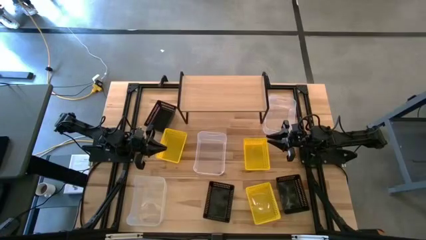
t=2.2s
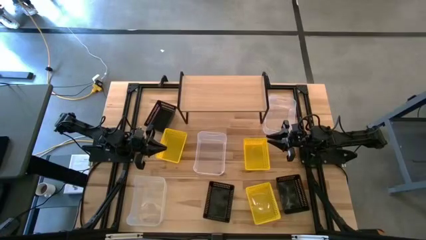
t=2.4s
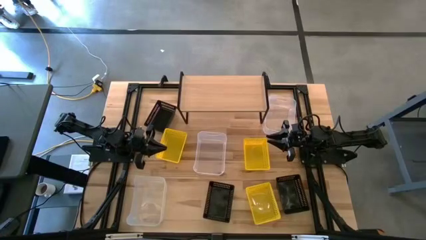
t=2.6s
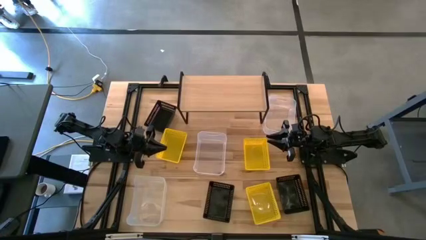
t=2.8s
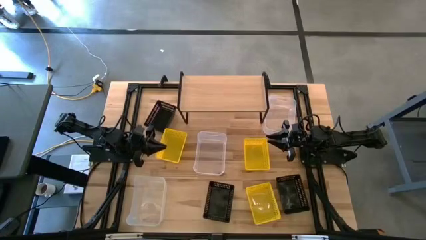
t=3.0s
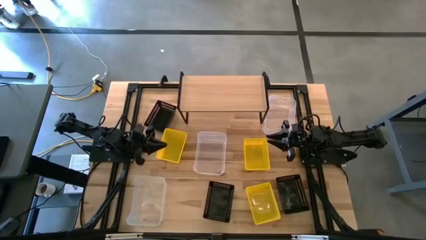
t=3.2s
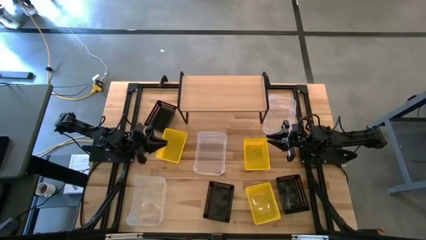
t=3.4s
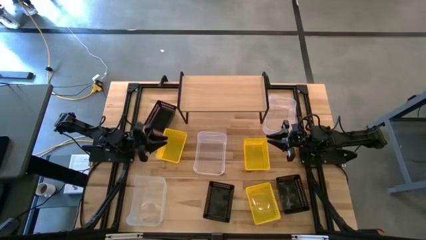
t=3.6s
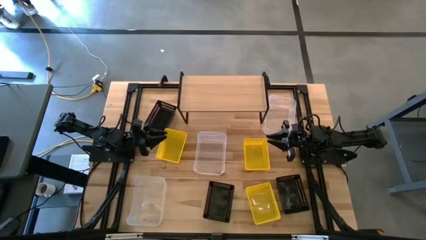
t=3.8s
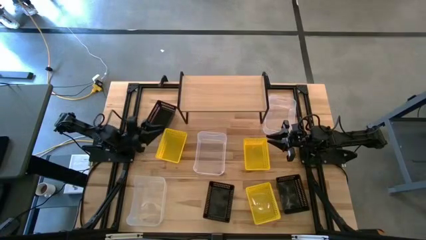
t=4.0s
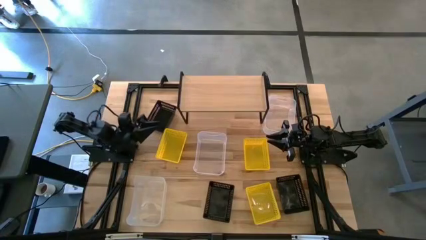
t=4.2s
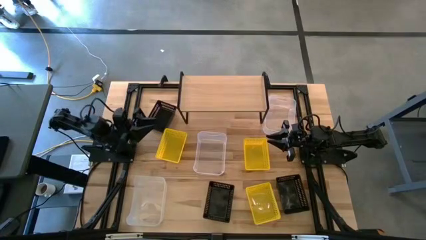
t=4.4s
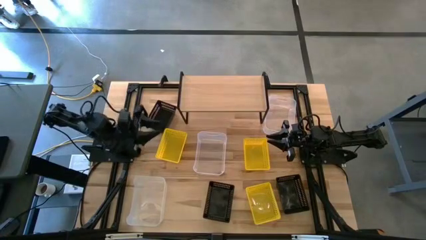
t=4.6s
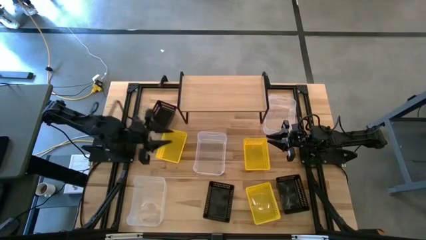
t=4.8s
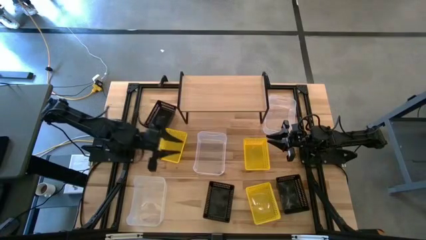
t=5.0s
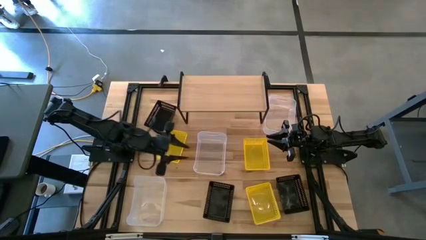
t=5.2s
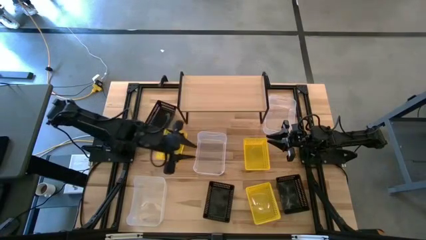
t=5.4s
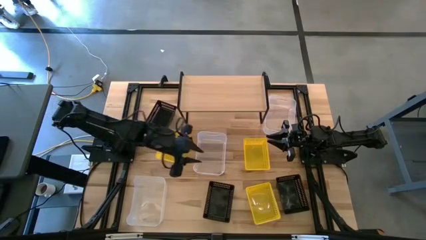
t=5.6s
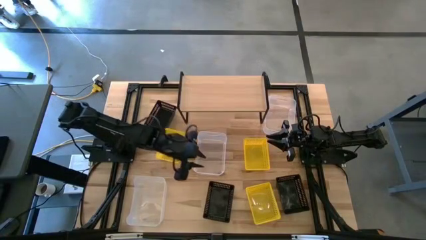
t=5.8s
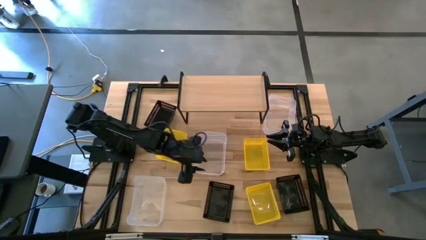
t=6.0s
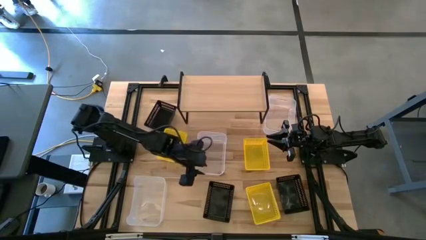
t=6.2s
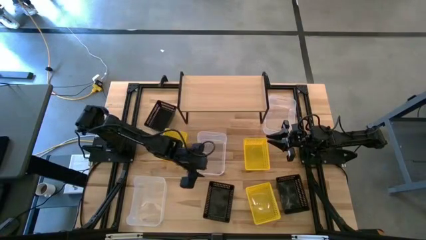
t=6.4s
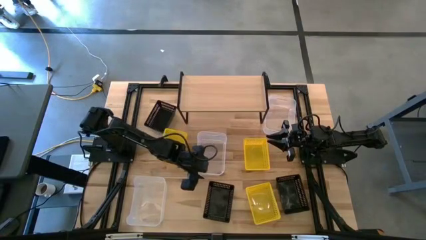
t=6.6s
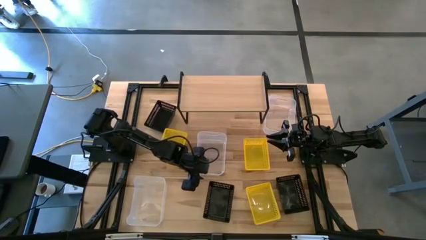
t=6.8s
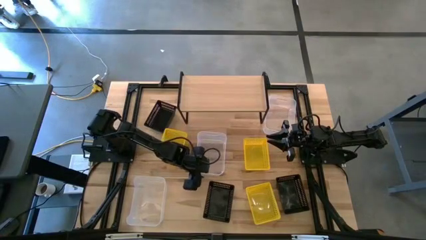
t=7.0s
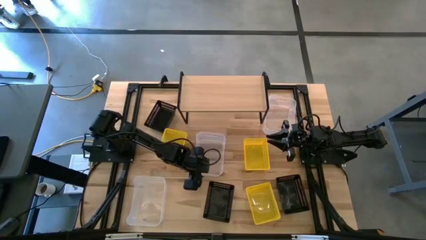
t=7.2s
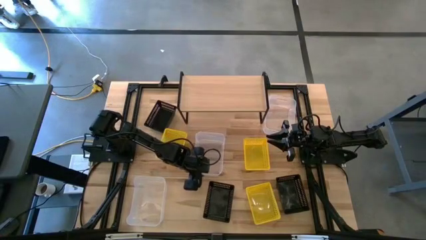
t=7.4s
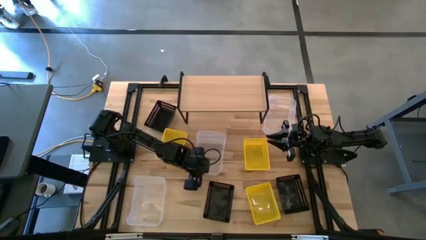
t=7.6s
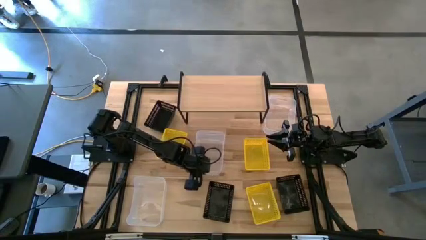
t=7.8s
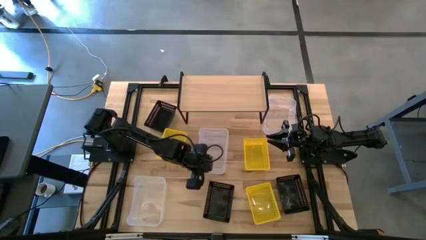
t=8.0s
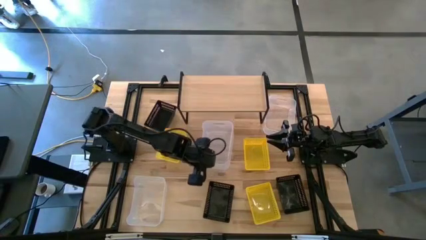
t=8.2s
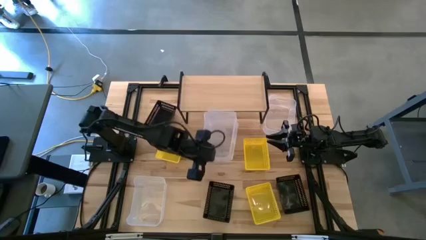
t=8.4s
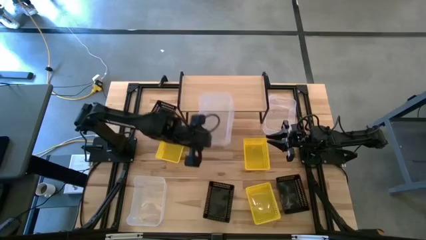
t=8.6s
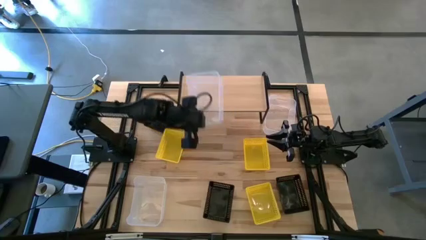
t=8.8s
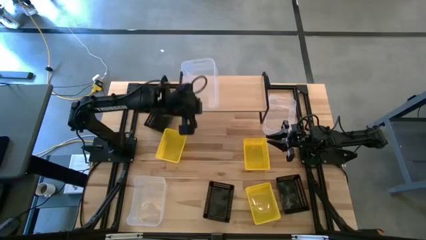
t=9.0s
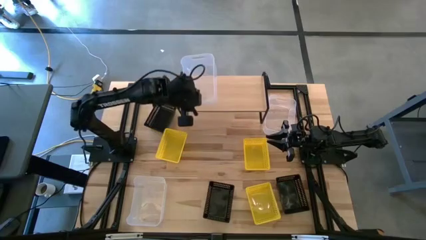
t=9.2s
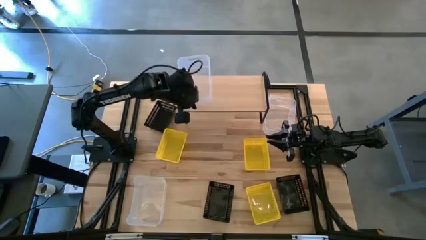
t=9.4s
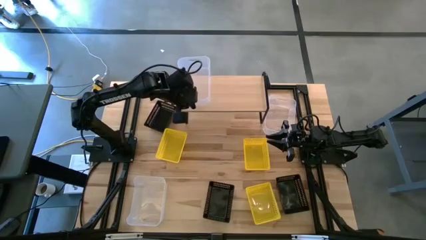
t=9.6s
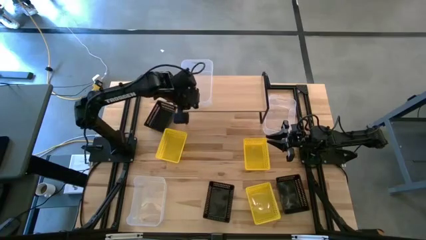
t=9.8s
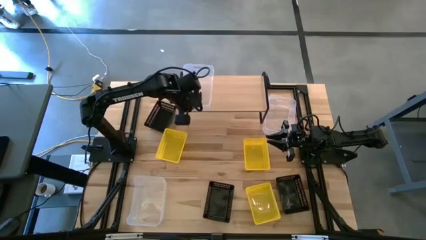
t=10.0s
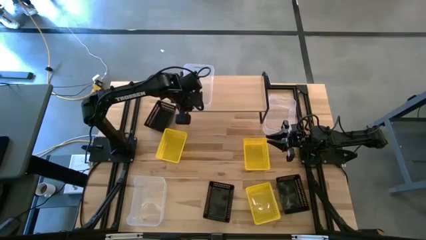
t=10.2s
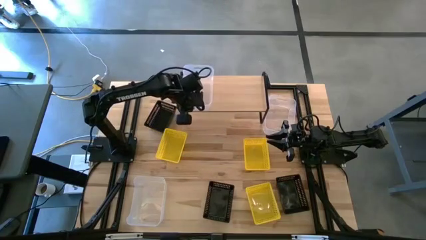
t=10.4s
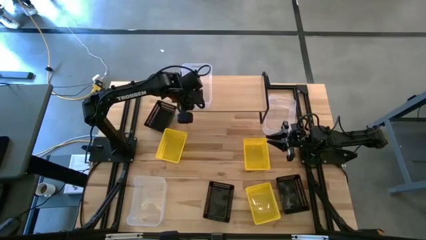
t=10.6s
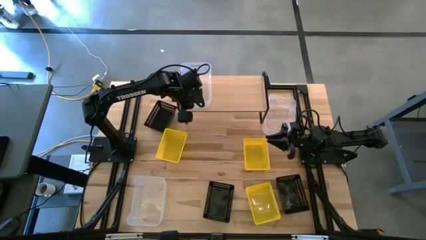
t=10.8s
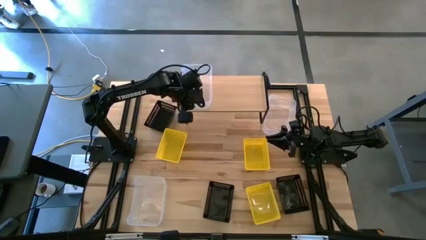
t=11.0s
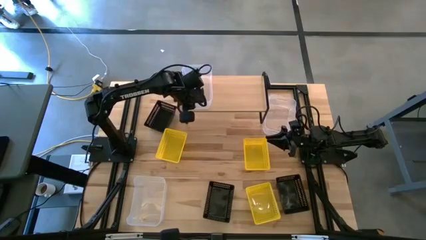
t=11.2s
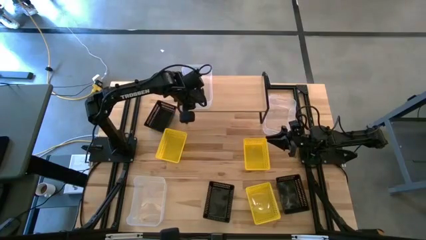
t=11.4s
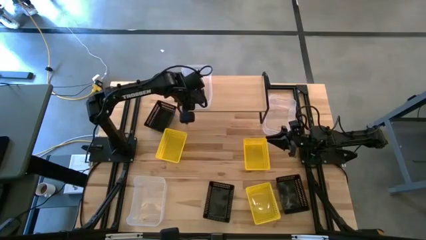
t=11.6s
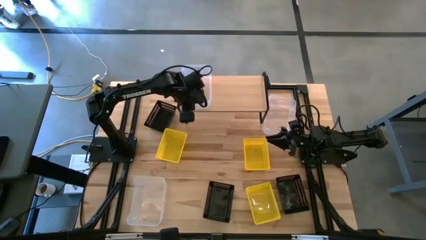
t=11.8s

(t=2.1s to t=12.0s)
Task: Stack baskets on shelf by color
Put the center transparent bin on the shelf

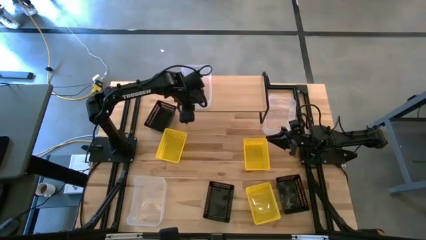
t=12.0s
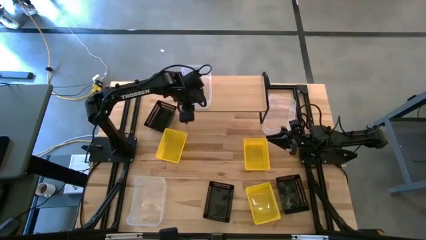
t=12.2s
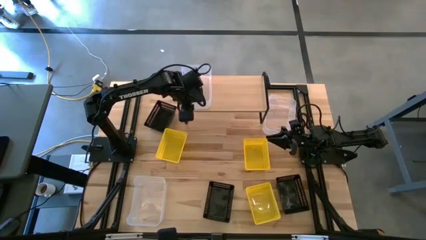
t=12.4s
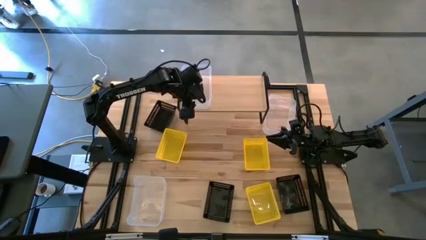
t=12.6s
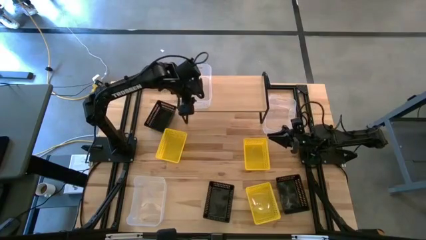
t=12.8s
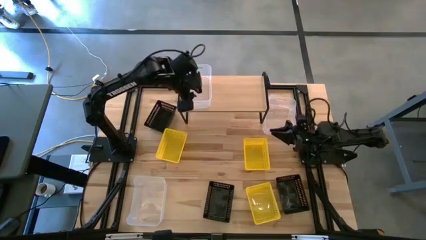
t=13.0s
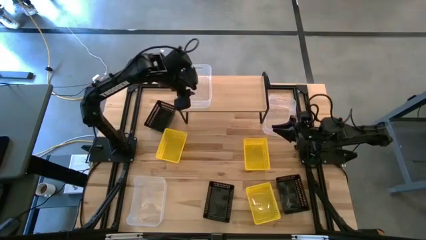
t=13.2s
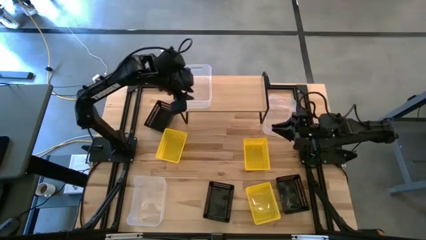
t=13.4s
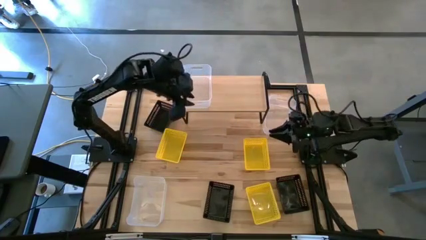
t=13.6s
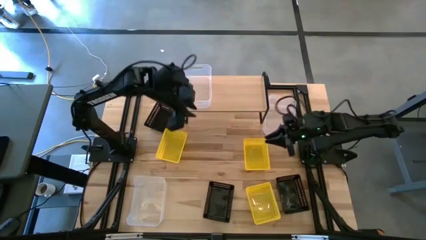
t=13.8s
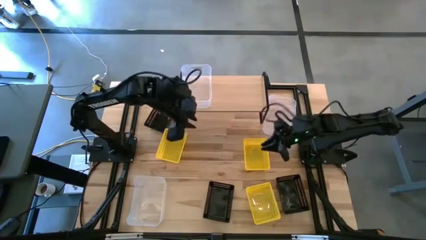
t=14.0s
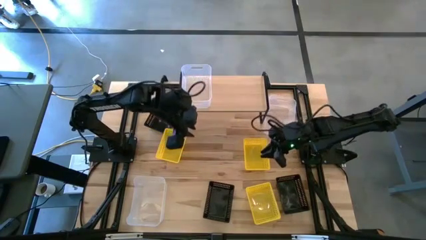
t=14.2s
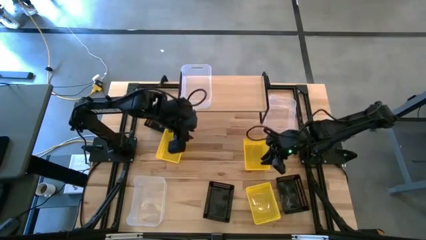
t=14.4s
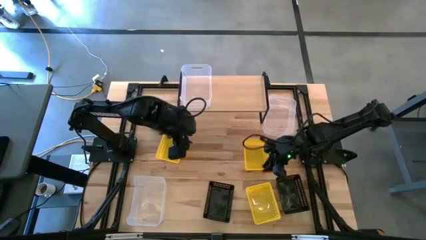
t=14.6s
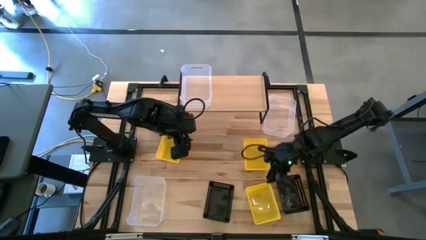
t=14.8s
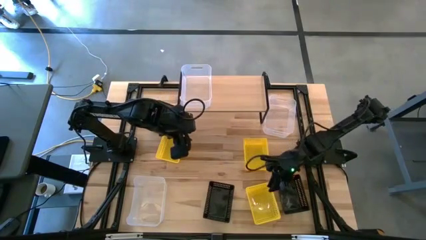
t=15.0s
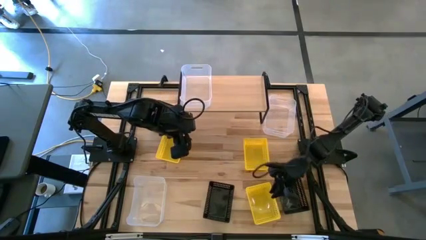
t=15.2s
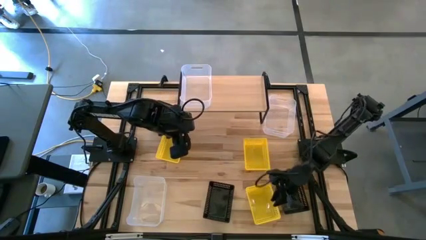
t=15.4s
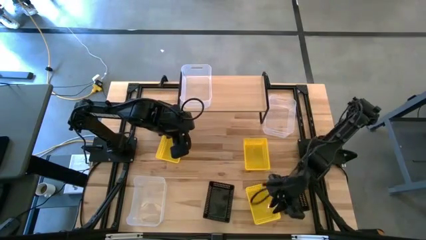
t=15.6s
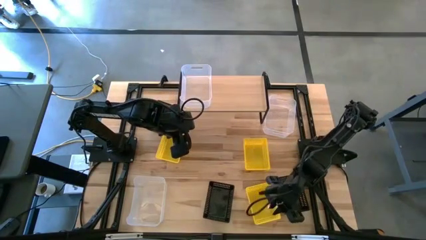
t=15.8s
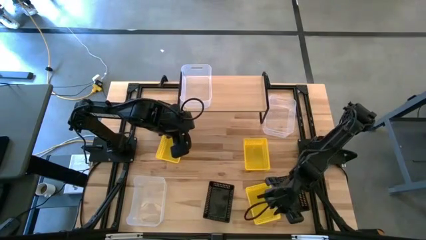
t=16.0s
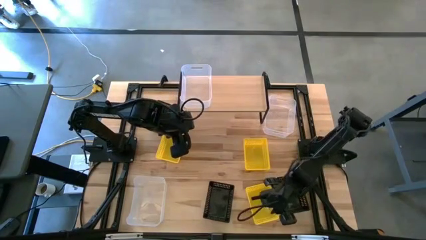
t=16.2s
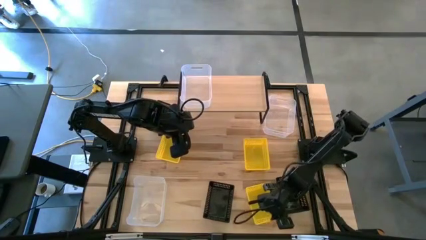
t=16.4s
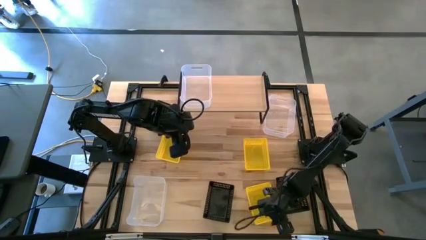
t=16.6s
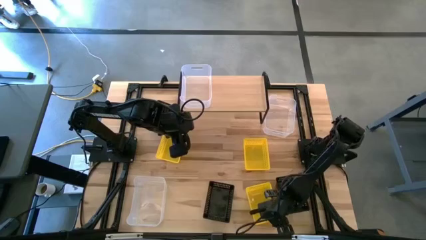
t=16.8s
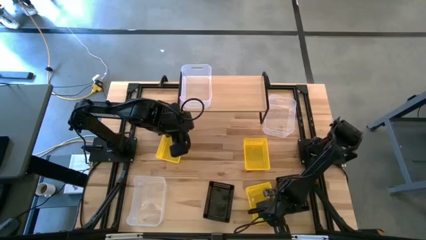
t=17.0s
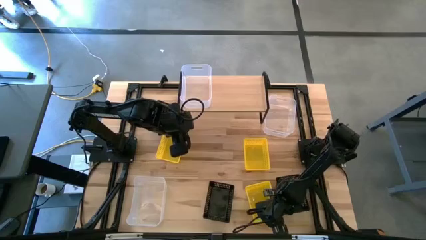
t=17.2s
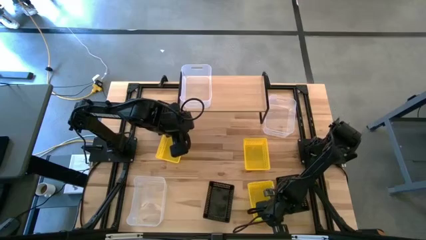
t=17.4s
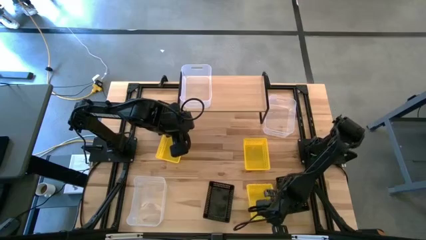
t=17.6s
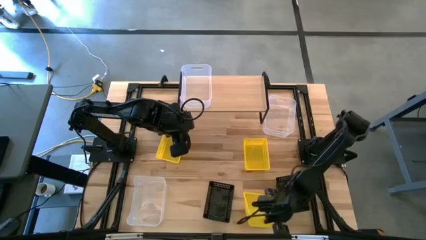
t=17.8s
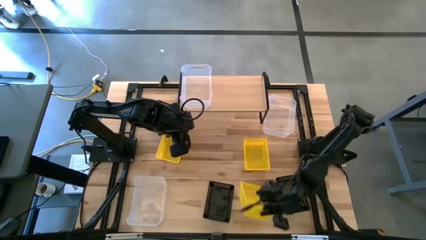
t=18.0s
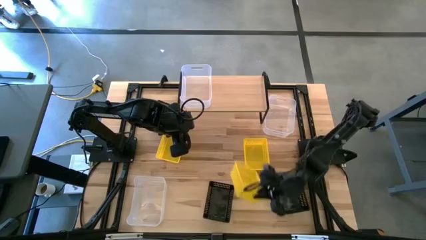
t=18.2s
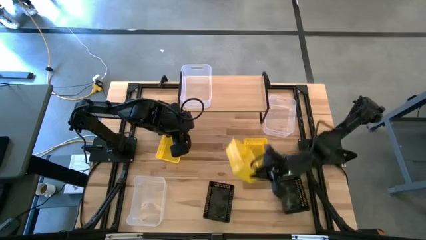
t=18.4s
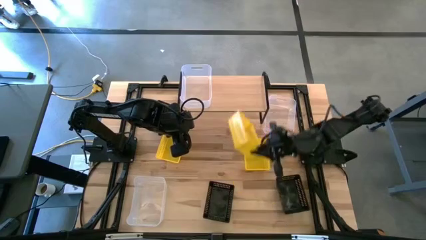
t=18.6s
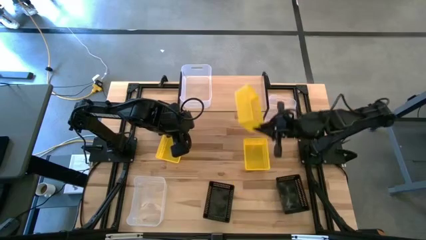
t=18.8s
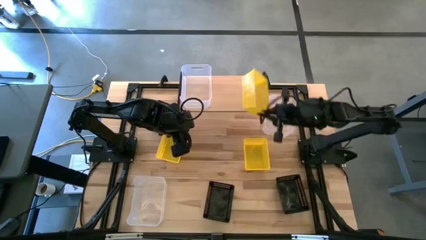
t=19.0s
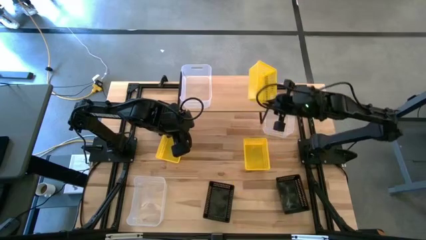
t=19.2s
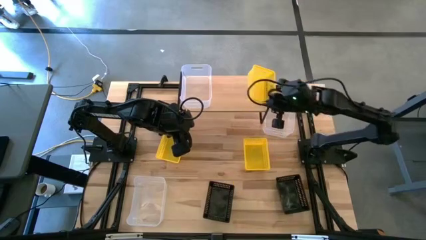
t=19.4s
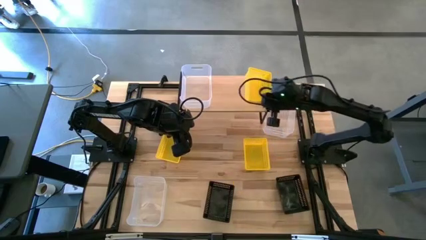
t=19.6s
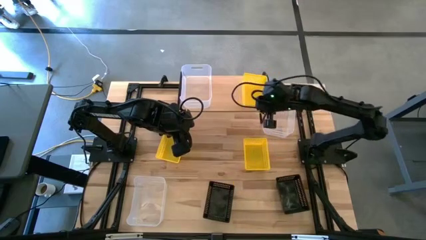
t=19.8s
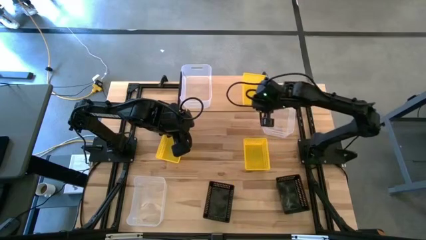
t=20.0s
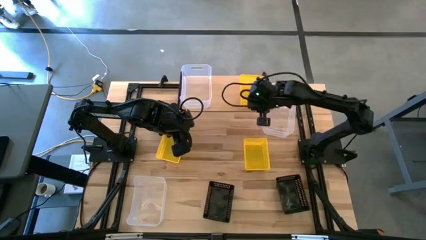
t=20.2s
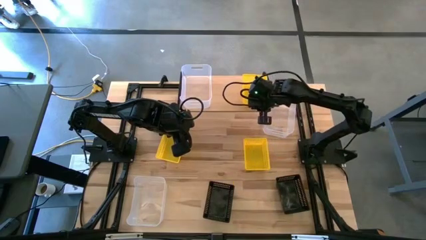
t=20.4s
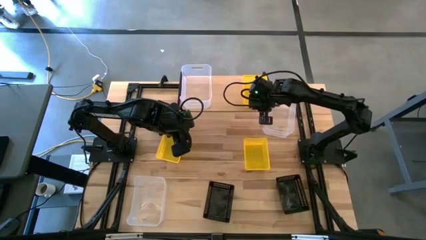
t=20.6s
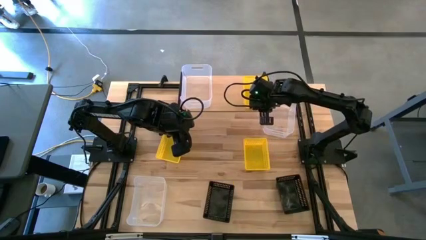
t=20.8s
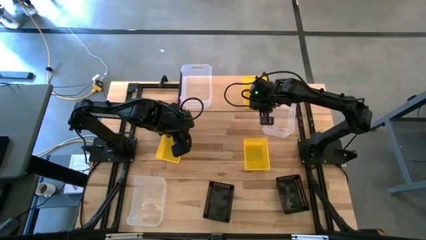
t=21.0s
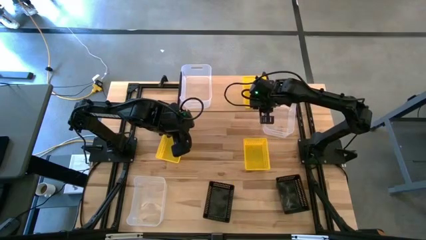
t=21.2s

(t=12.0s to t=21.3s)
Put the bottom right yellow bin on the shelf
